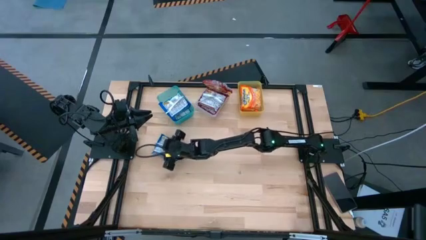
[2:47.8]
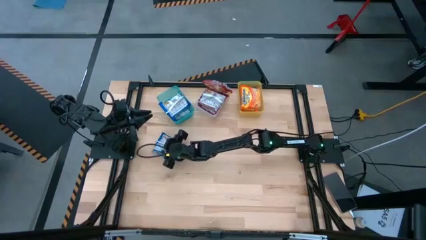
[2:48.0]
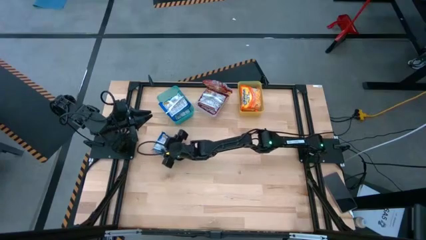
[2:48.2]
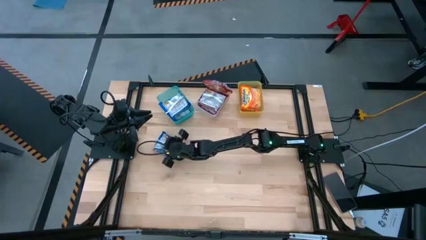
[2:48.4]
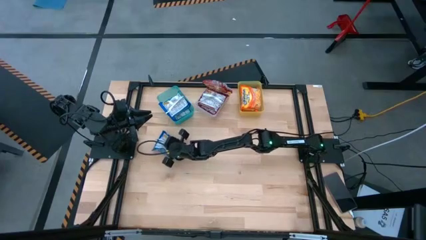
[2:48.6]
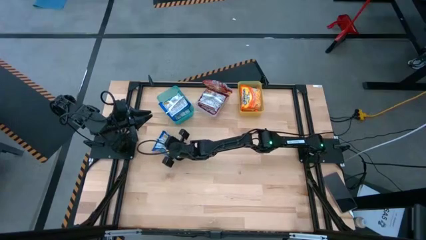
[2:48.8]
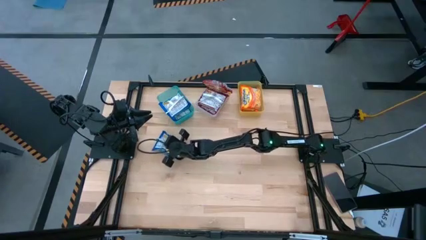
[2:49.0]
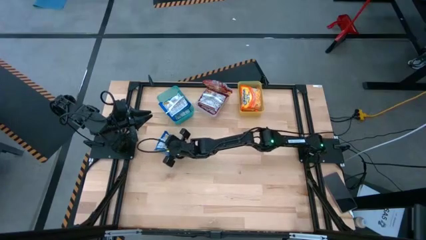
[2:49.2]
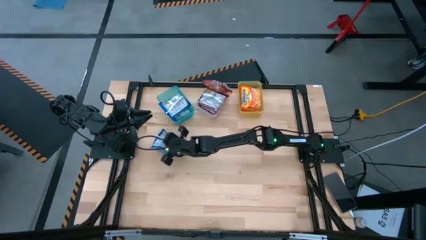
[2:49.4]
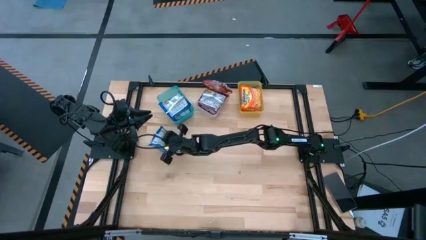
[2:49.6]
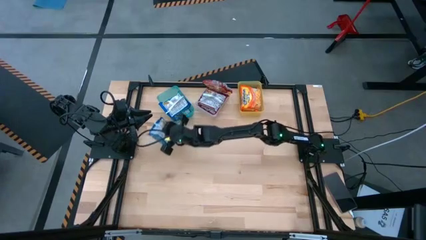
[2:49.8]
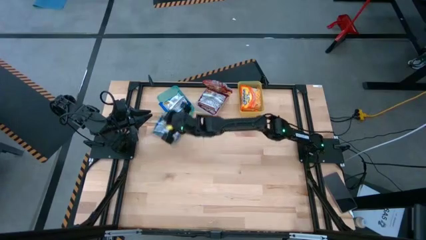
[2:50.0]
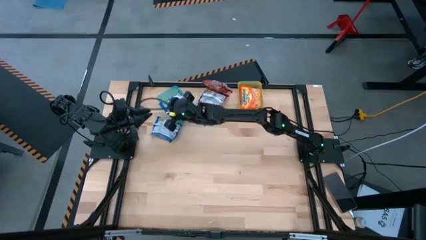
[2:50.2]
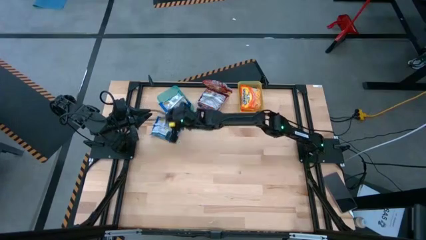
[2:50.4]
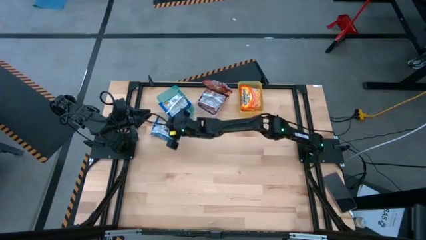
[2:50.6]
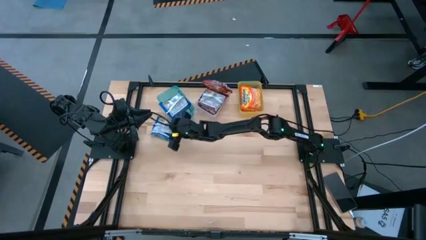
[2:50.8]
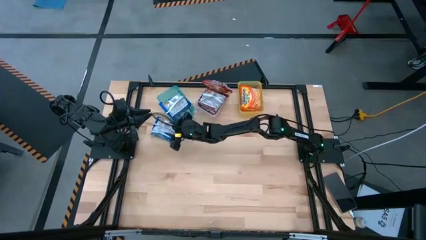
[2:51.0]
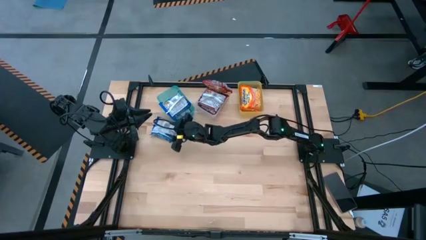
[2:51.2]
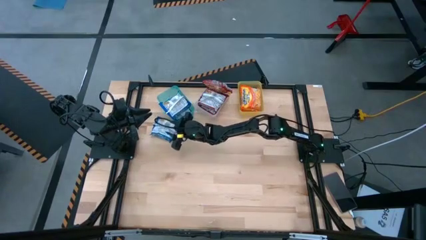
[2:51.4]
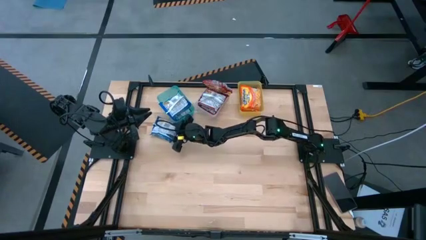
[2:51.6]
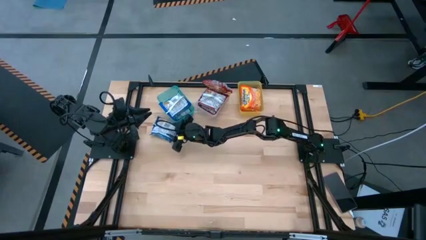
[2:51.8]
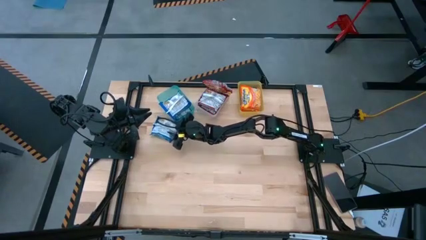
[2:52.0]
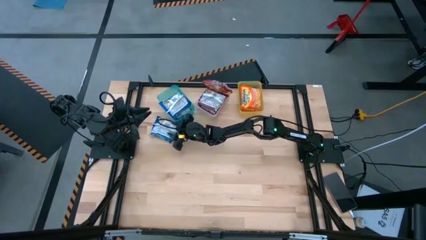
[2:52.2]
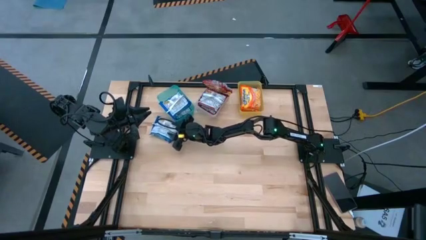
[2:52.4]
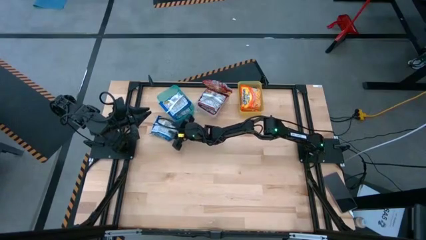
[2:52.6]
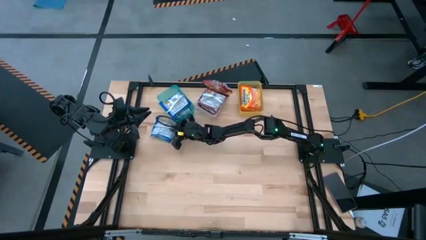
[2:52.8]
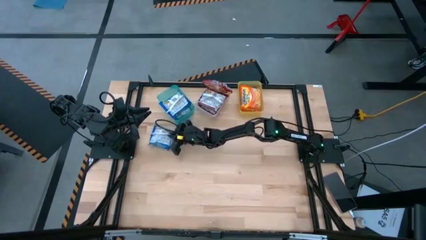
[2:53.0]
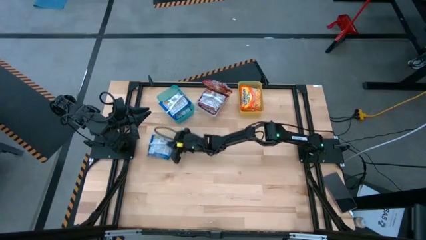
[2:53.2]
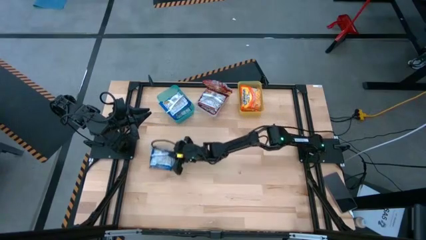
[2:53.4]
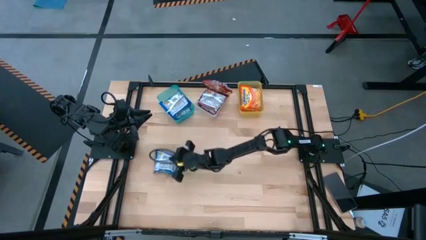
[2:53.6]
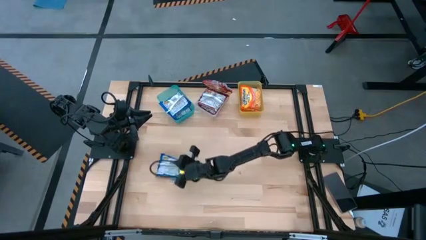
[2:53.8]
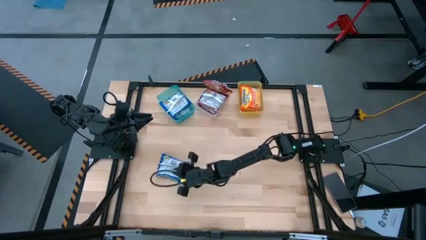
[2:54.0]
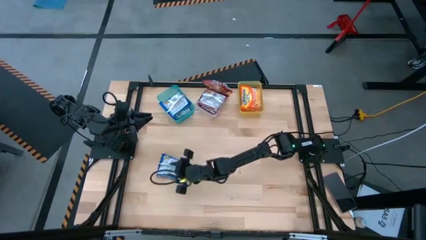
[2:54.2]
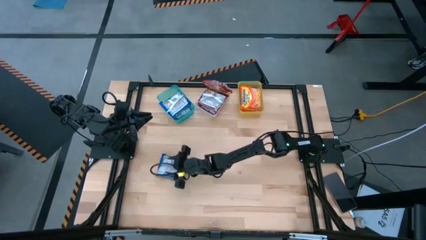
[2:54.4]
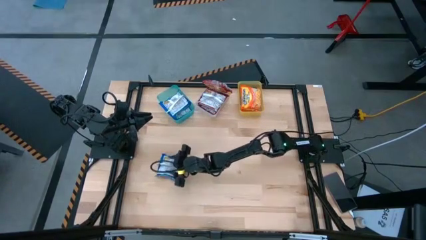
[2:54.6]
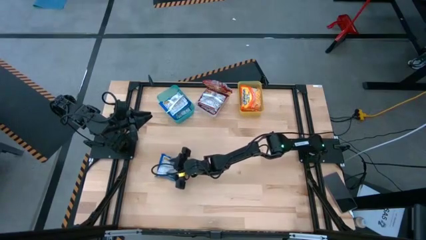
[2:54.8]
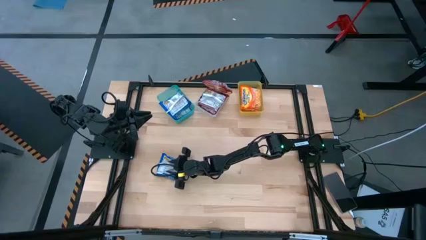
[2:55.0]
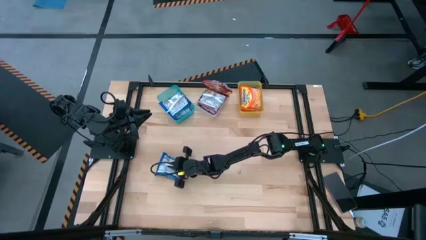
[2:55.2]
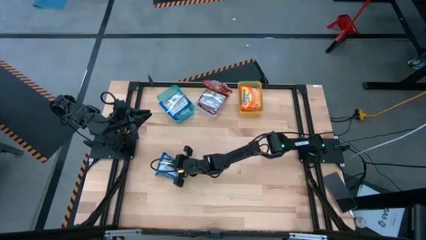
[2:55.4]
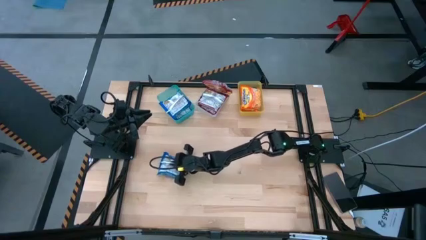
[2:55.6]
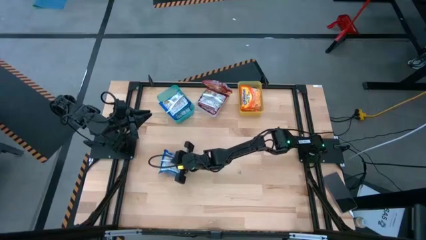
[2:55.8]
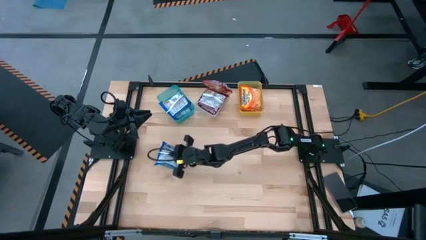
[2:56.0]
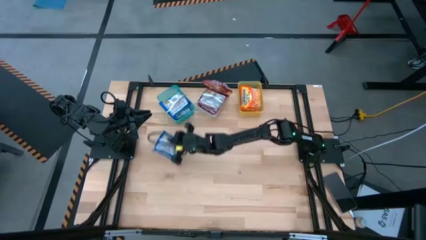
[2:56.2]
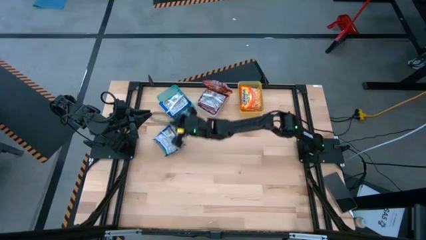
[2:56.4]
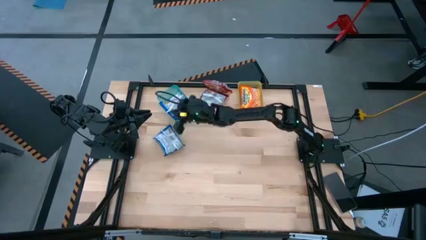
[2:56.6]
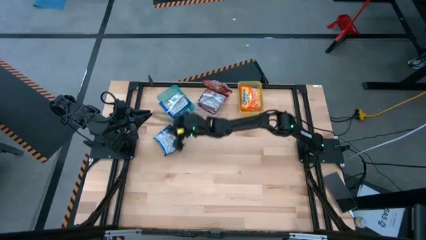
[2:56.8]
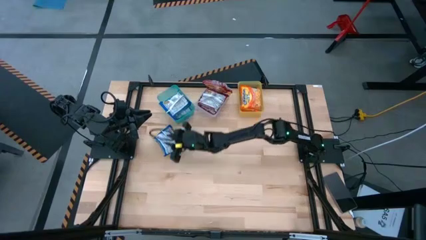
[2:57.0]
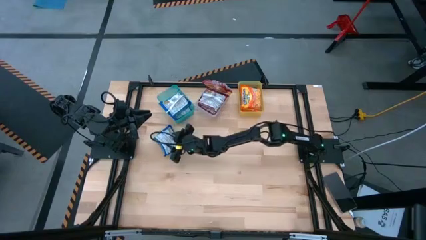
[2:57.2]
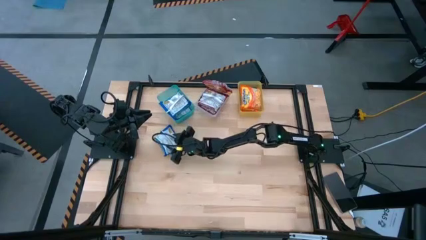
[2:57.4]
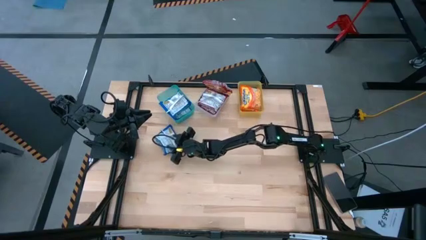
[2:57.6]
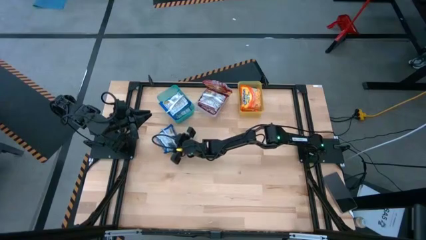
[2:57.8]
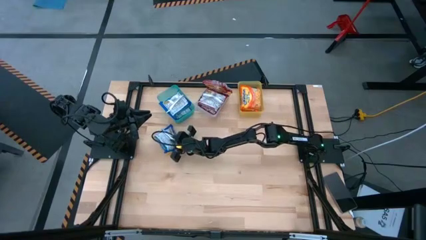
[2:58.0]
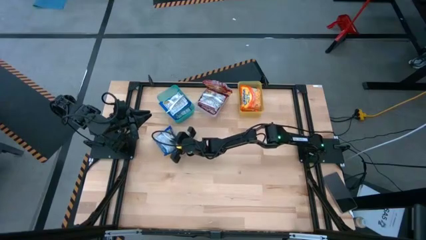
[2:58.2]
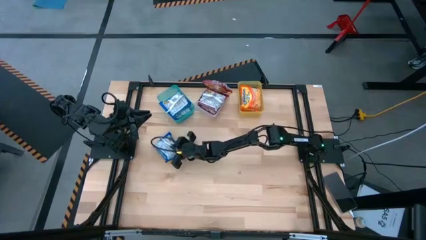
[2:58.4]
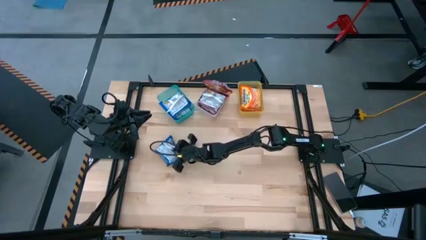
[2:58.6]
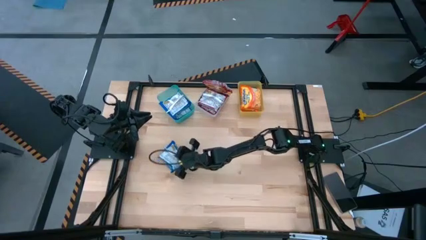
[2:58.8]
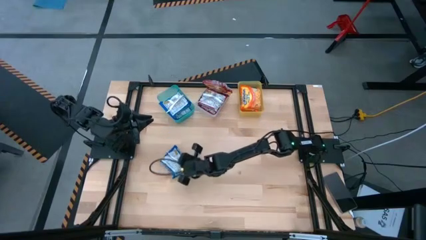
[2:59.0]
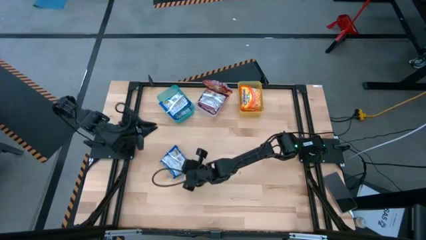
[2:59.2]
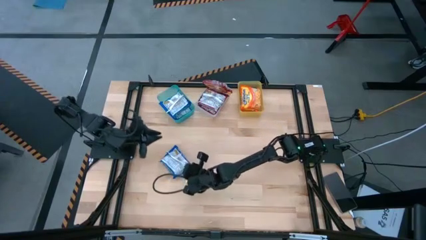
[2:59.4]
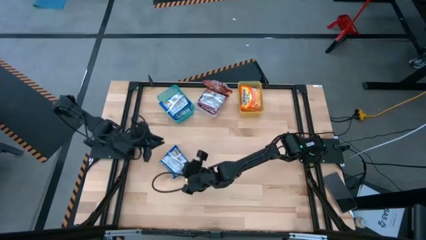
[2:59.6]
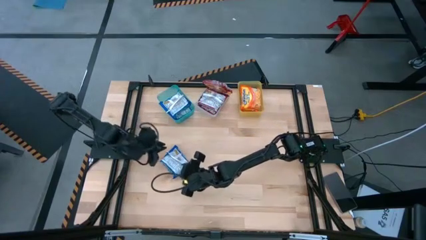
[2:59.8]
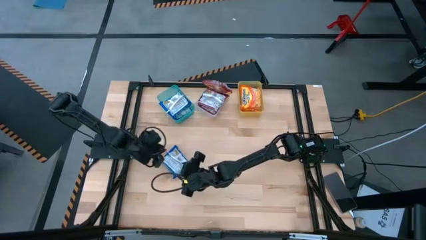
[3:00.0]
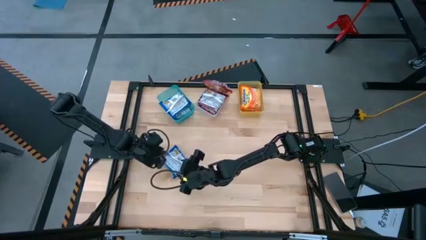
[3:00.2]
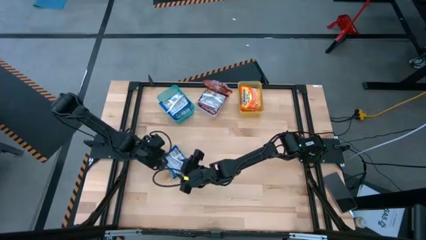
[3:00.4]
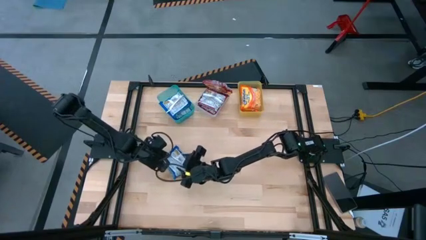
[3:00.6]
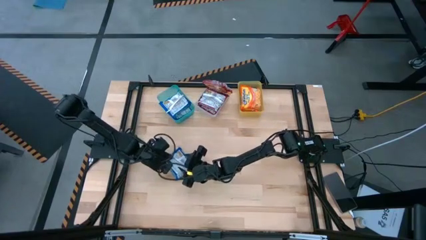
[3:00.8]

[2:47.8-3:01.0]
Task: Sort Maruchan noodles
Put the blue noodle pack into the blue bin

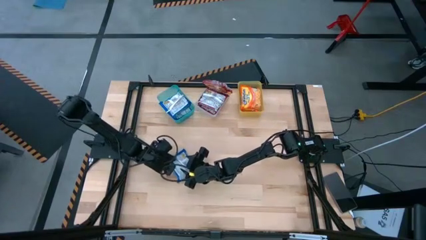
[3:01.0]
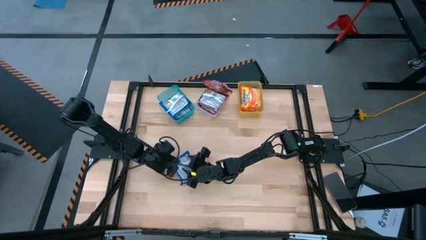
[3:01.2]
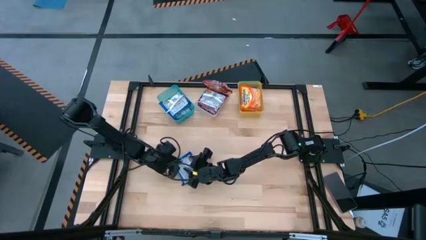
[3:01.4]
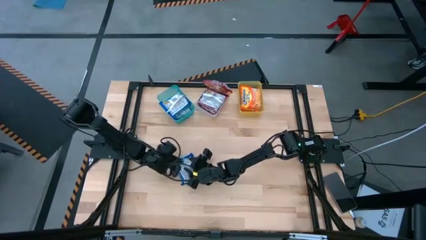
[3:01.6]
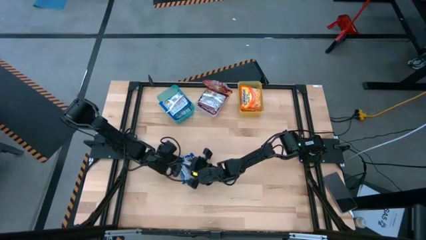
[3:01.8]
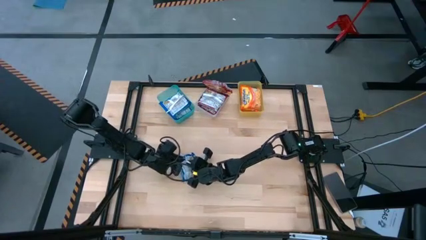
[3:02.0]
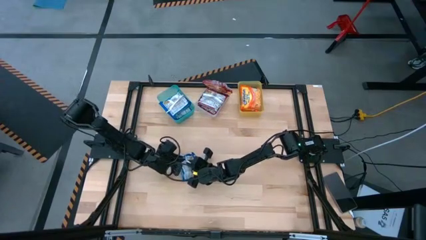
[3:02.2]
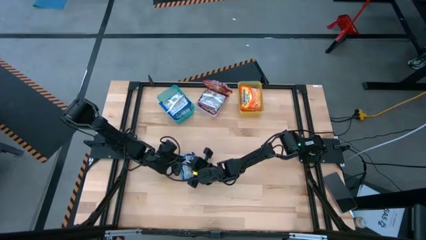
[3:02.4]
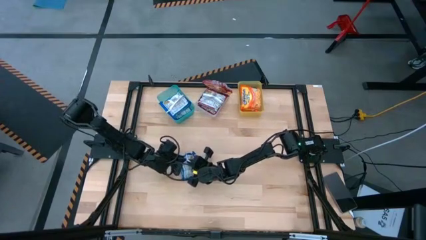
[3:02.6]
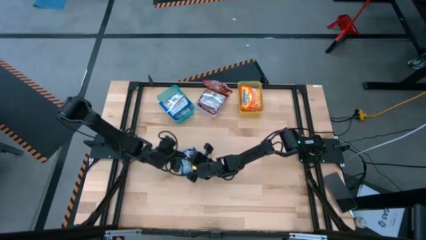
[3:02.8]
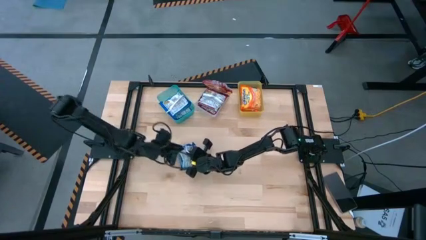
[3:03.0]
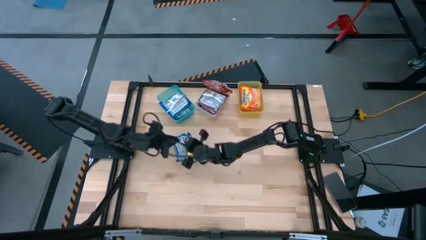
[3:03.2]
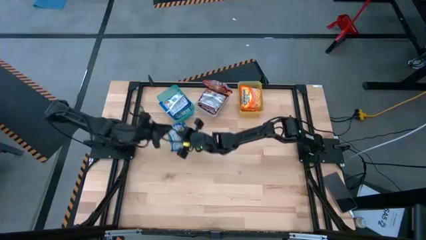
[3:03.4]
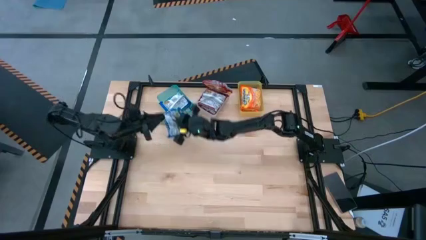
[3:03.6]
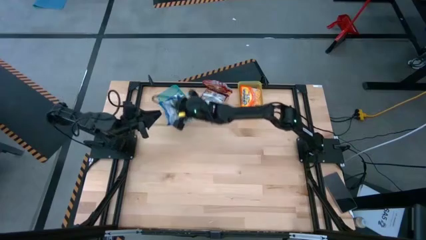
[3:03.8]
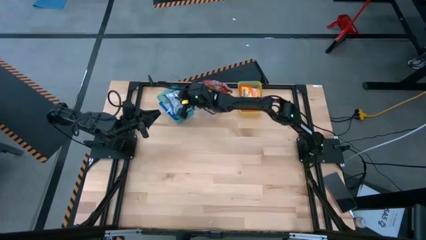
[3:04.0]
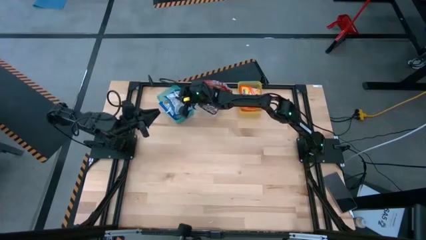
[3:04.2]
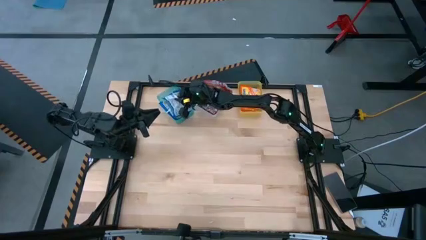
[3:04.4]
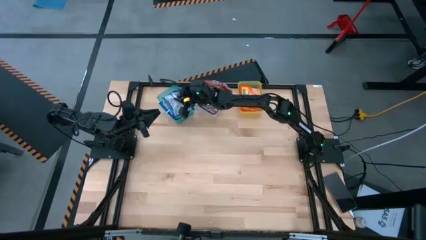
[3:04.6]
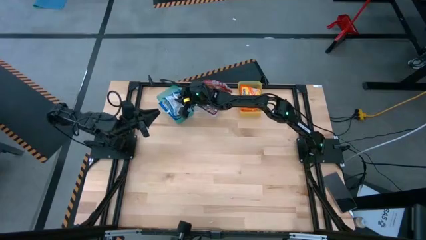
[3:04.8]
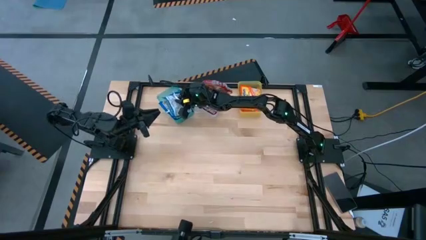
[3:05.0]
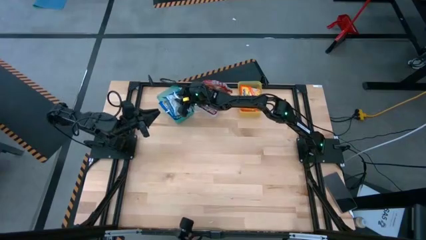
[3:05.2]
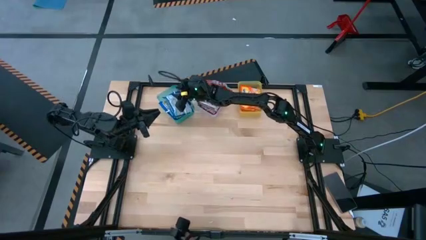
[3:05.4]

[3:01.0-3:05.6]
Put the blue noodle pack into the blue bin
